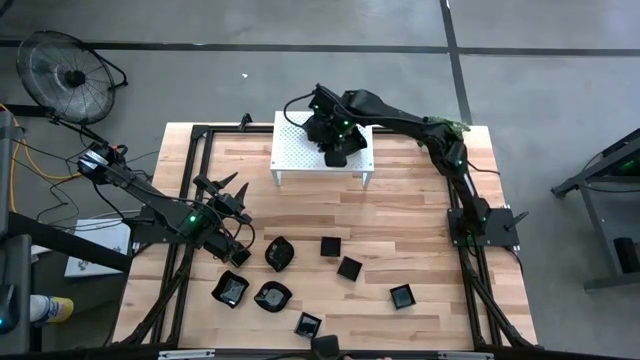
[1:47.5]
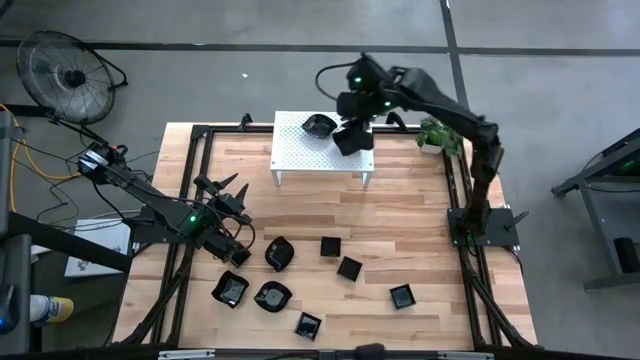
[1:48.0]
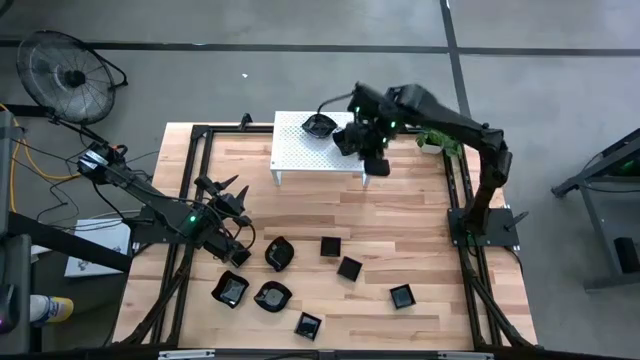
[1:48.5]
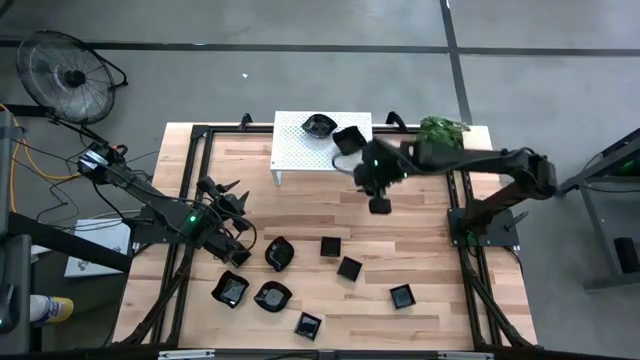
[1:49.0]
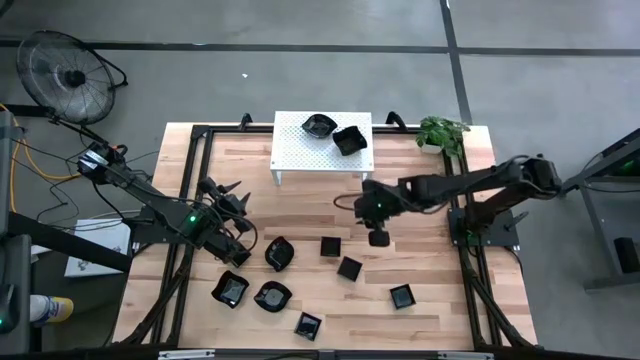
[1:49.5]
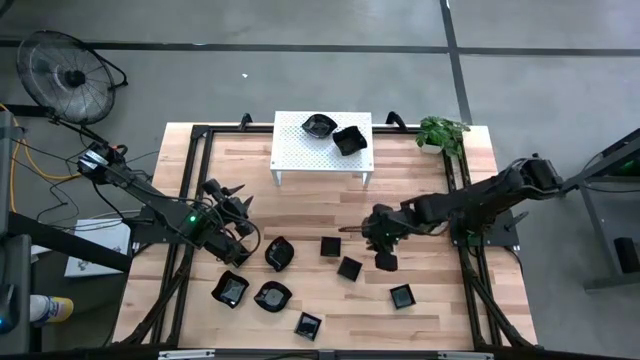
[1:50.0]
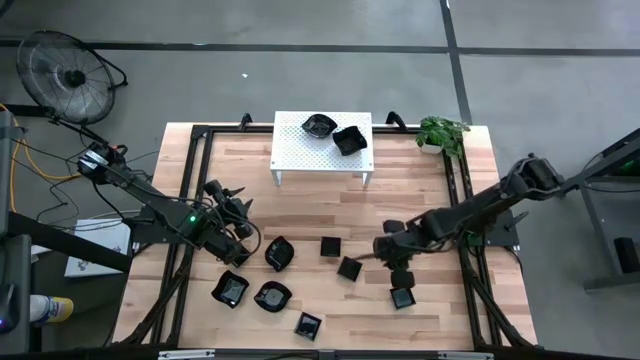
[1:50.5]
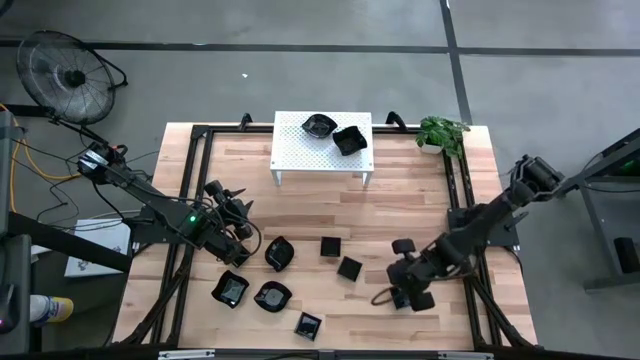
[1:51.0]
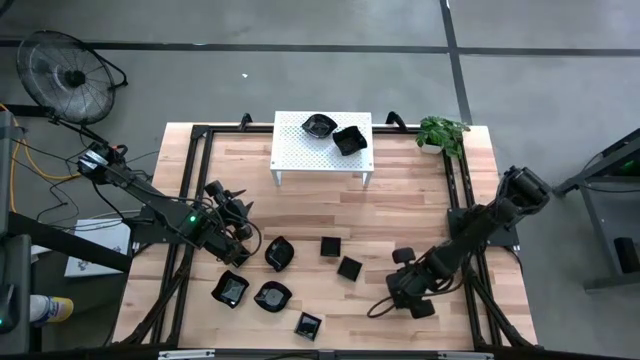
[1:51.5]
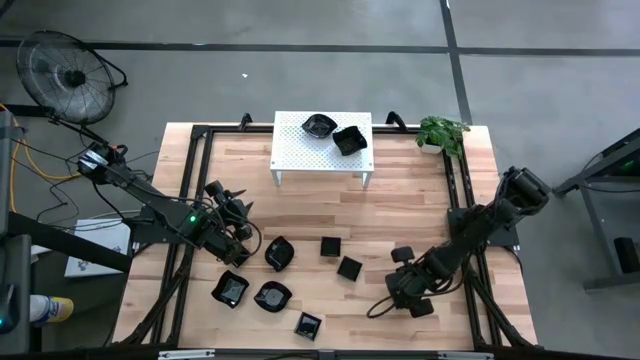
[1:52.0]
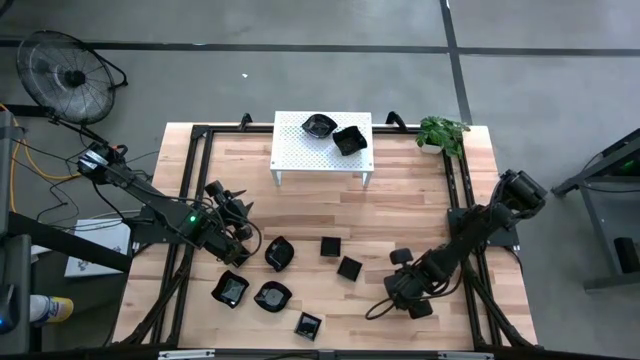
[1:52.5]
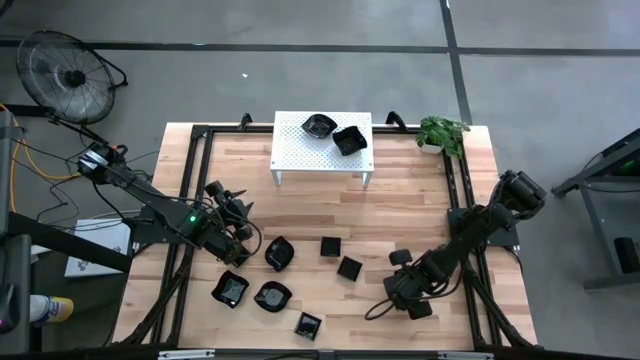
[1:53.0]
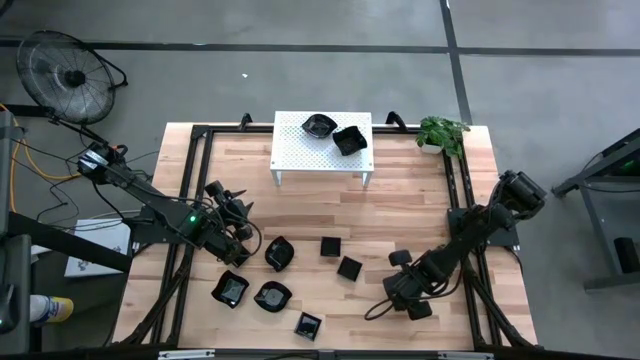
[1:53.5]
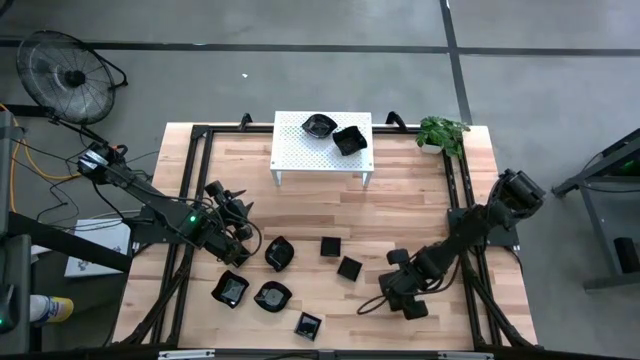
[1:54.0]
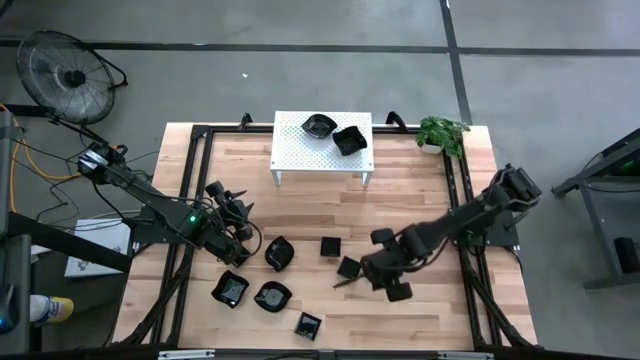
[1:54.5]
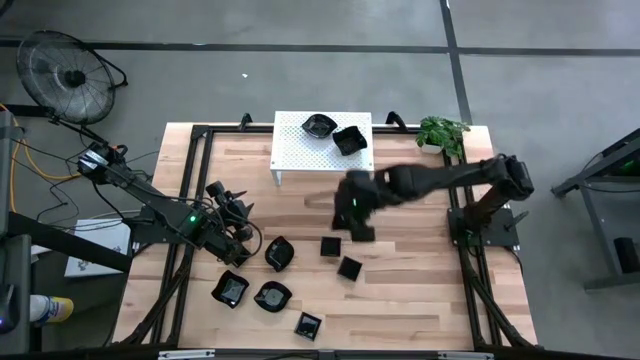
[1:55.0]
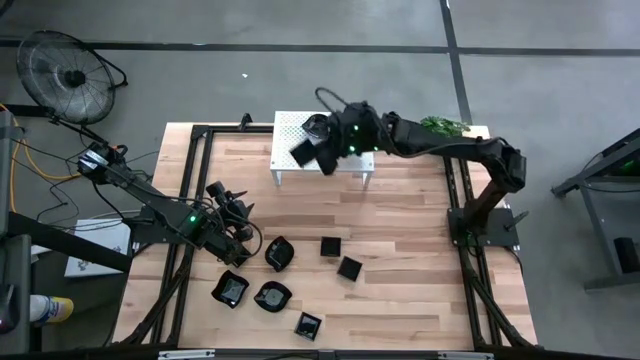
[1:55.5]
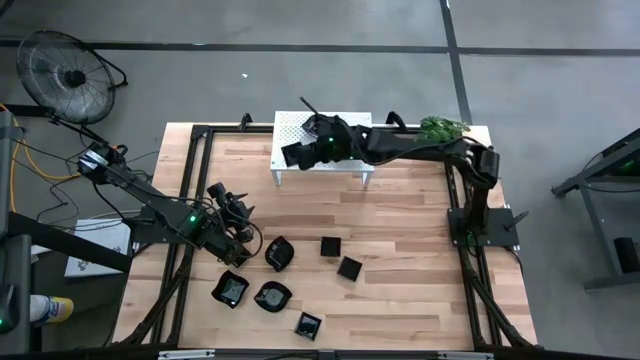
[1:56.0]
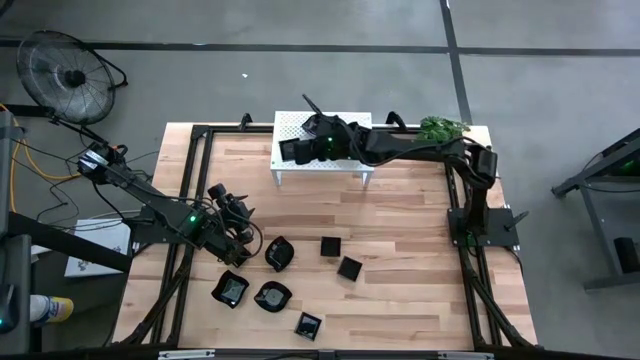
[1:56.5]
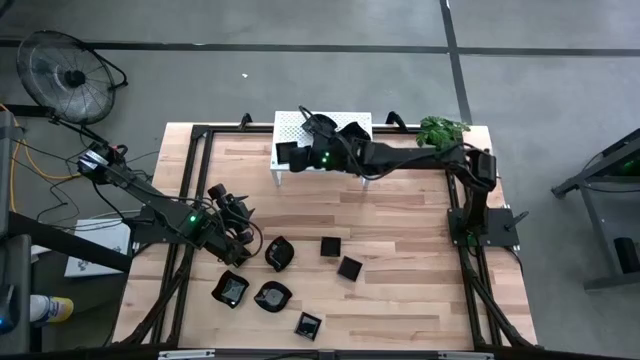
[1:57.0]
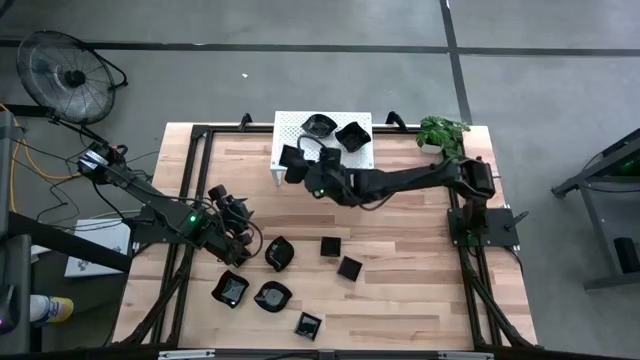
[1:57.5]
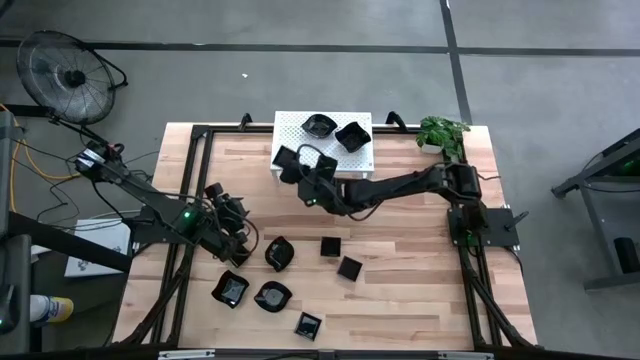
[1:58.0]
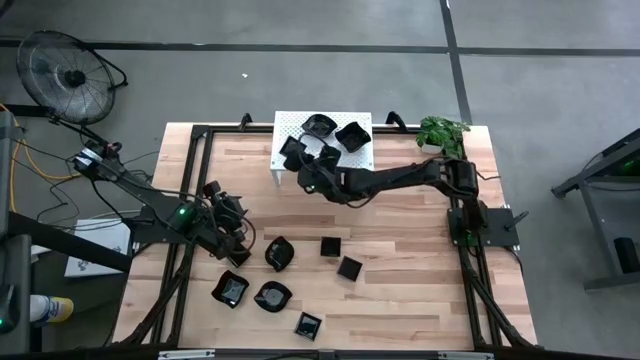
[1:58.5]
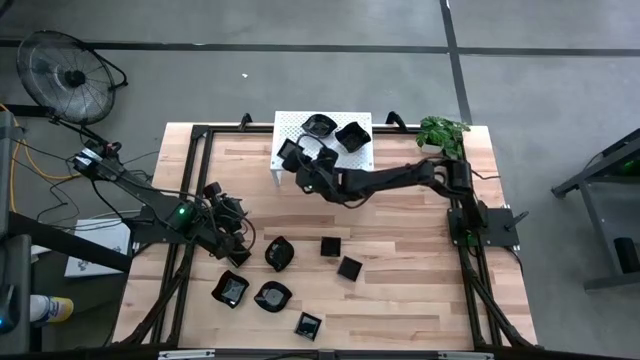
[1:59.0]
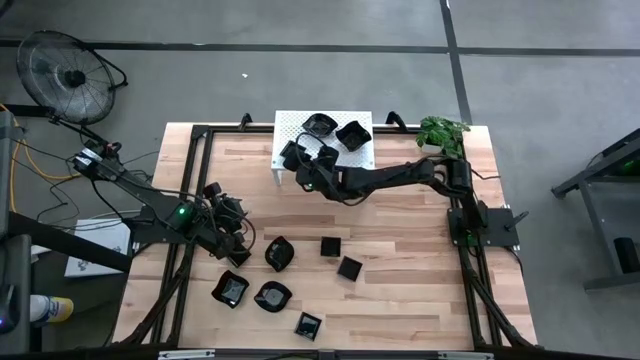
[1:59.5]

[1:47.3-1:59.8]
Task: Pick & Place Mini shaped plates
Put the black square plate on the shelf

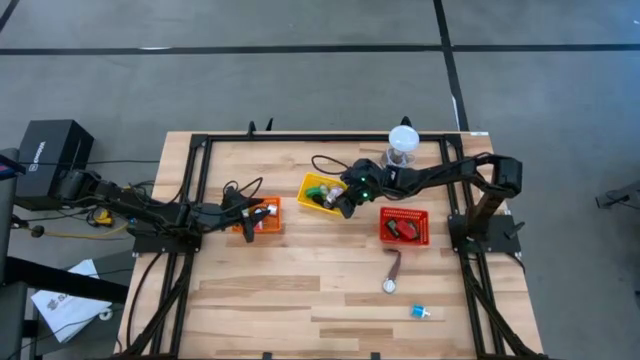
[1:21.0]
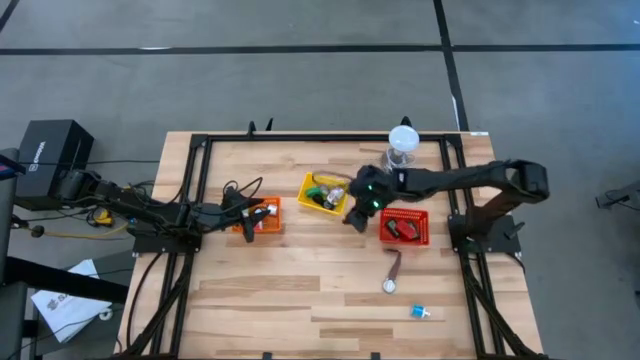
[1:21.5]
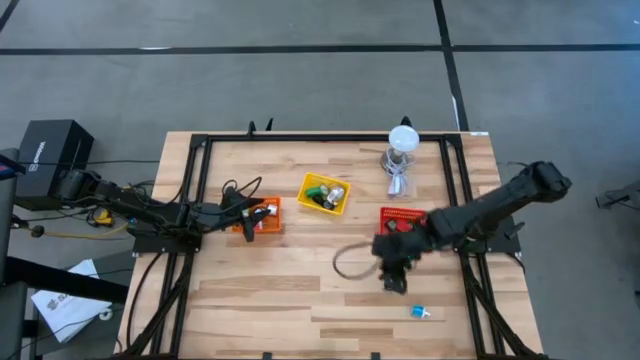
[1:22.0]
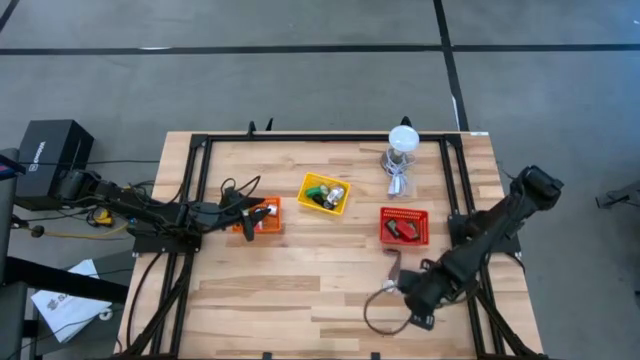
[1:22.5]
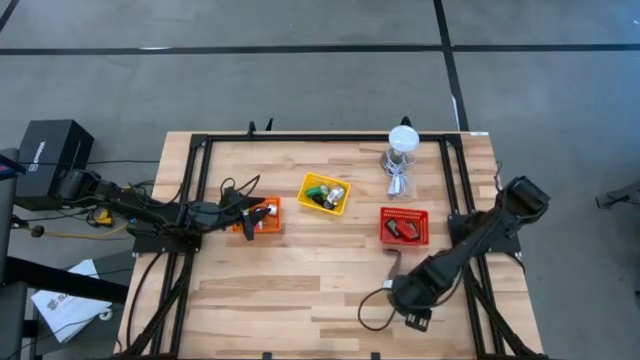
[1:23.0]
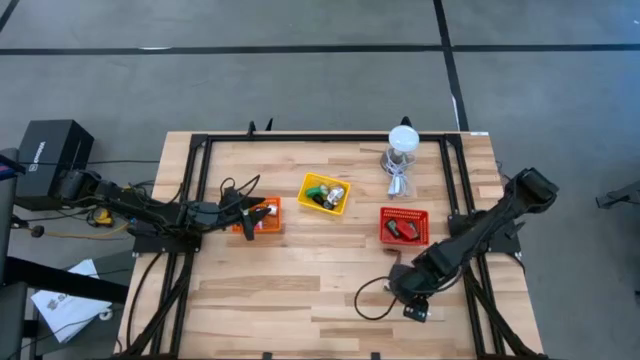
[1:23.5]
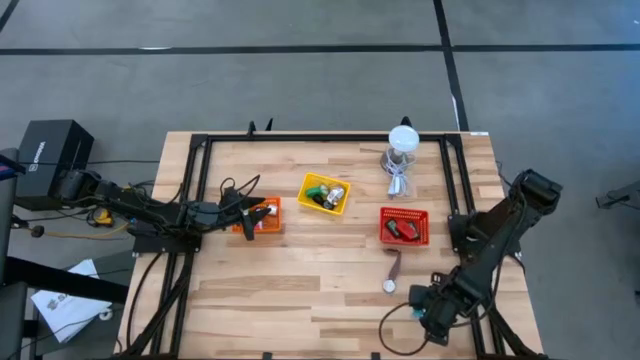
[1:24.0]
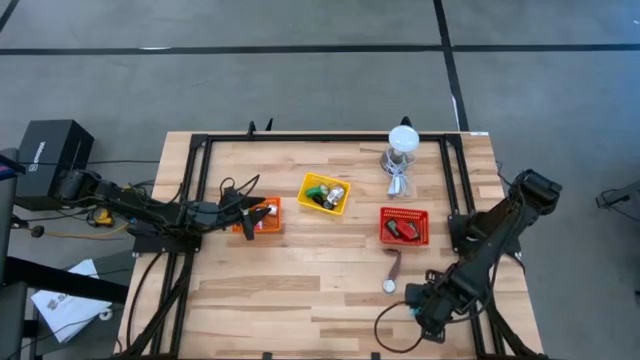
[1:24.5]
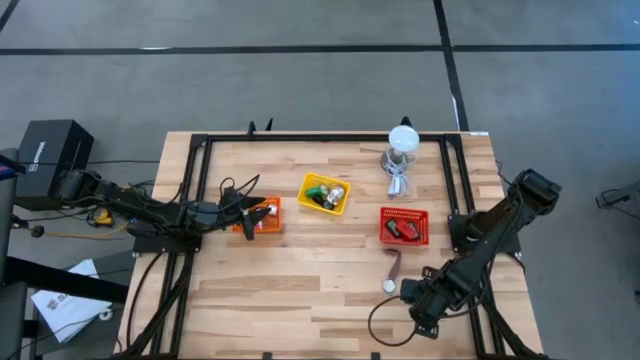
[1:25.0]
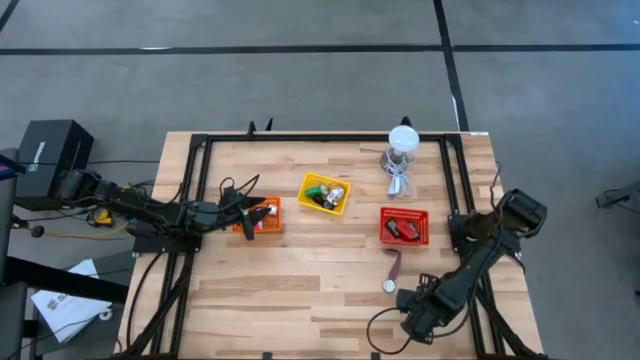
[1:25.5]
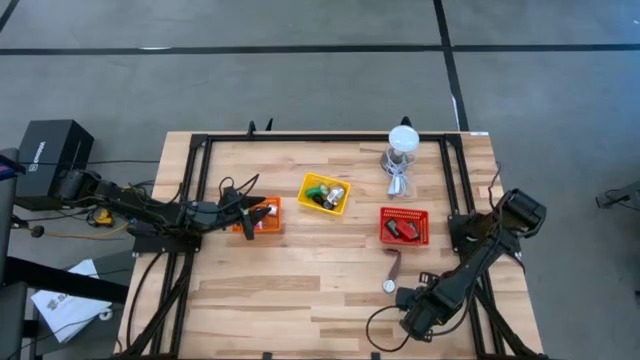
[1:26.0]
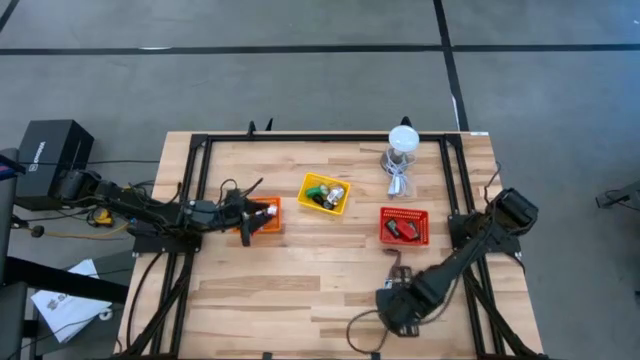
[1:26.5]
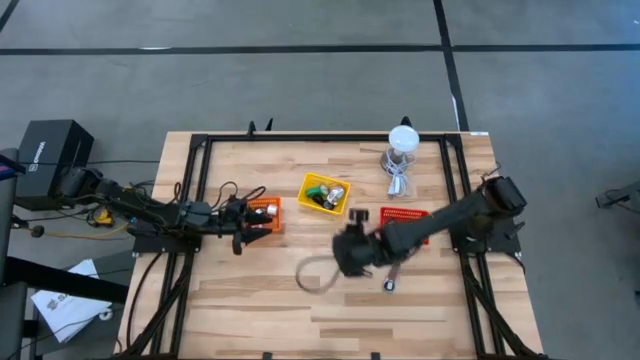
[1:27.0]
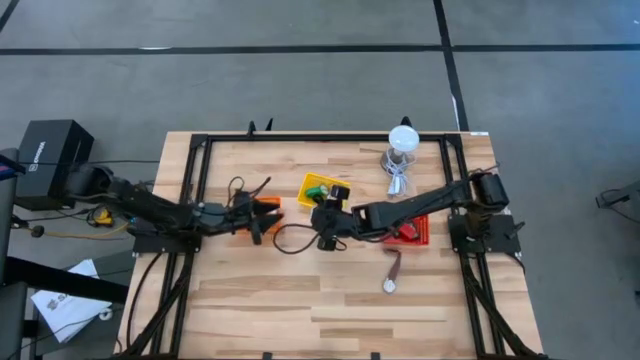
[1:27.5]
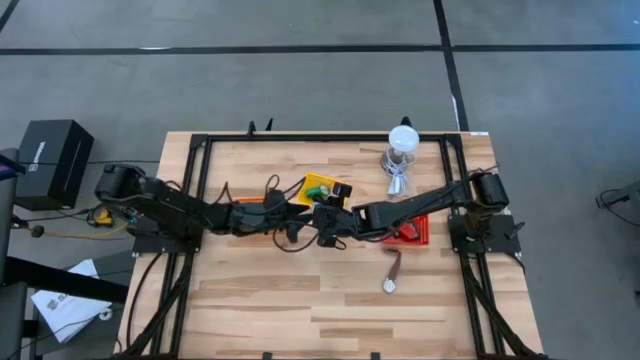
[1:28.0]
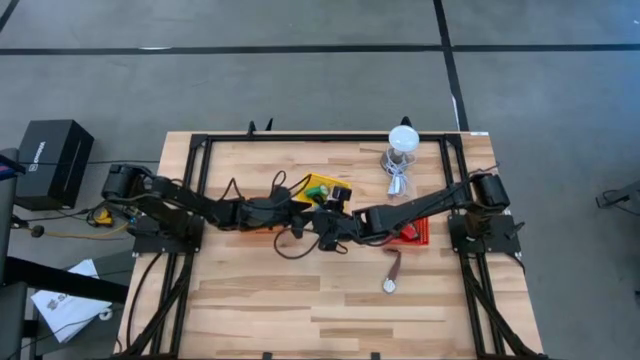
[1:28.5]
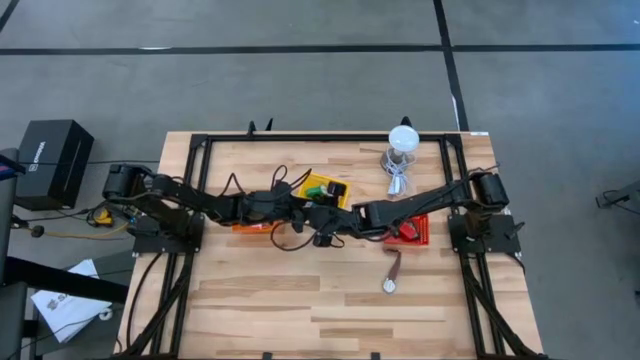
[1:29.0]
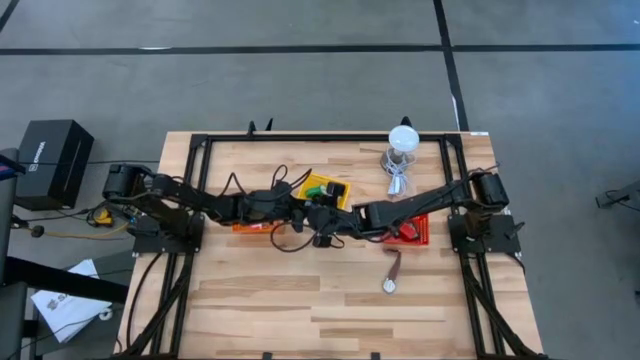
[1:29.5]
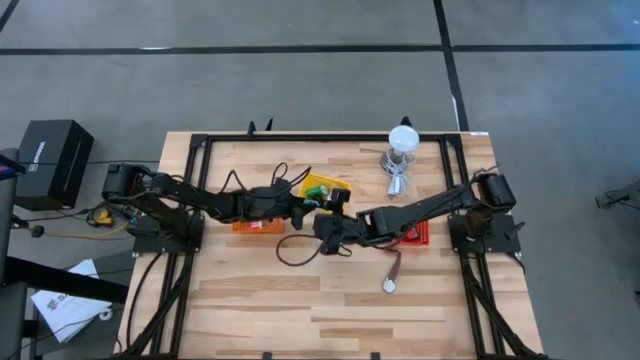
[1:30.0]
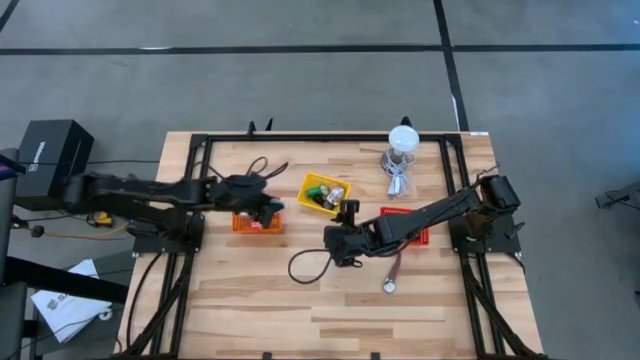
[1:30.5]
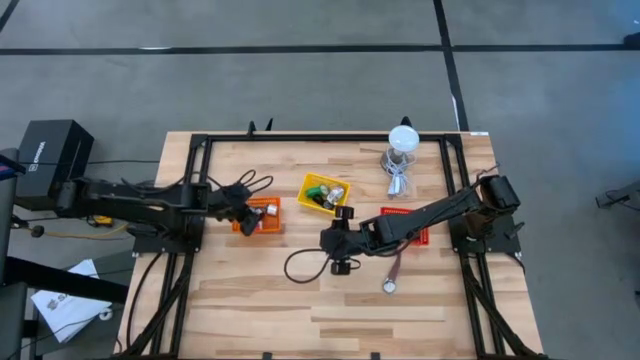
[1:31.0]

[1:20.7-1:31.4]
Task: Pick & Place Office items
Put the blue charging adapter into the orange bin
